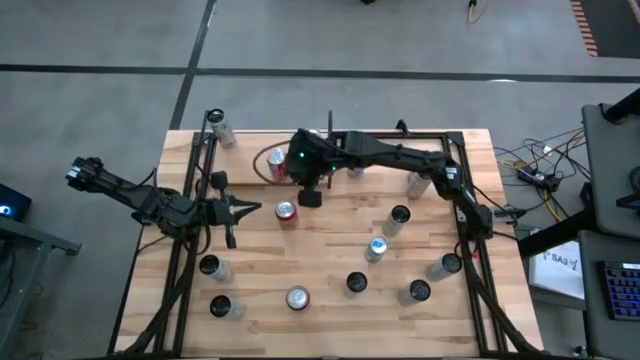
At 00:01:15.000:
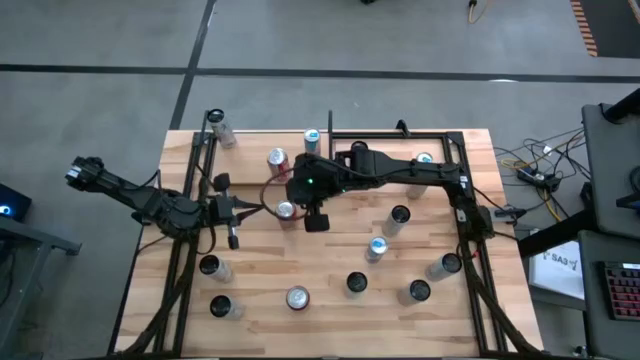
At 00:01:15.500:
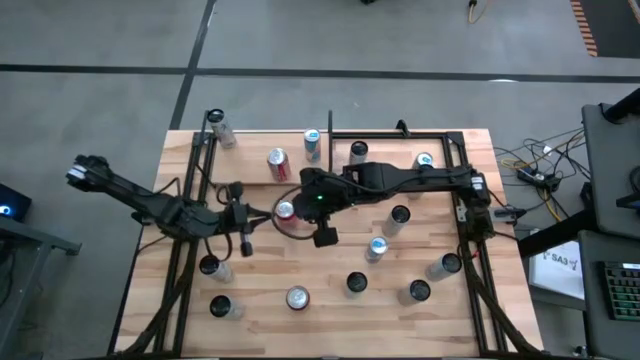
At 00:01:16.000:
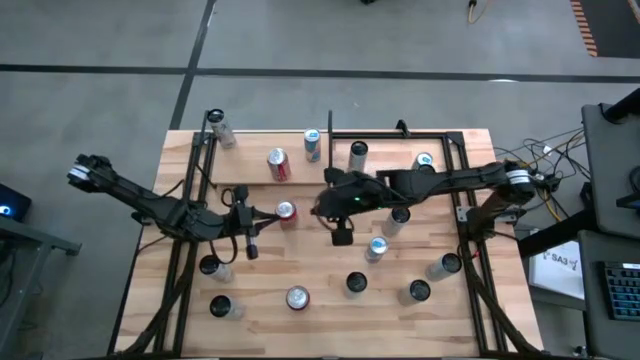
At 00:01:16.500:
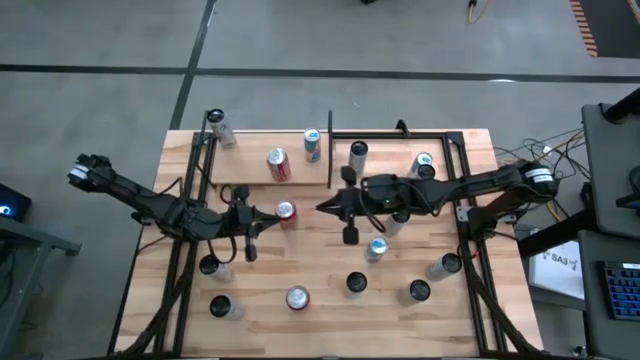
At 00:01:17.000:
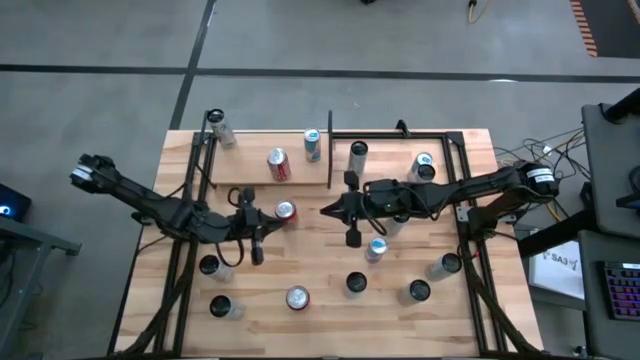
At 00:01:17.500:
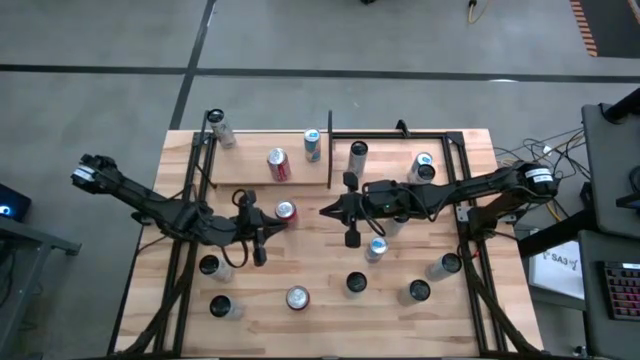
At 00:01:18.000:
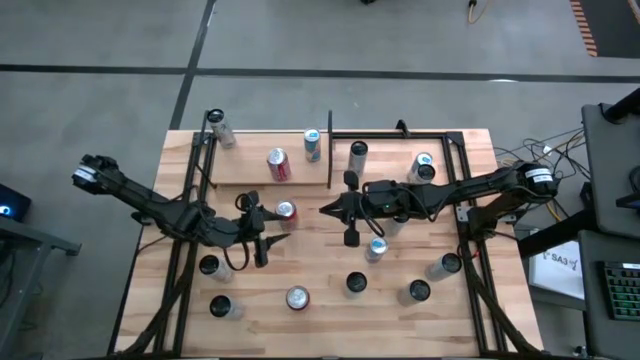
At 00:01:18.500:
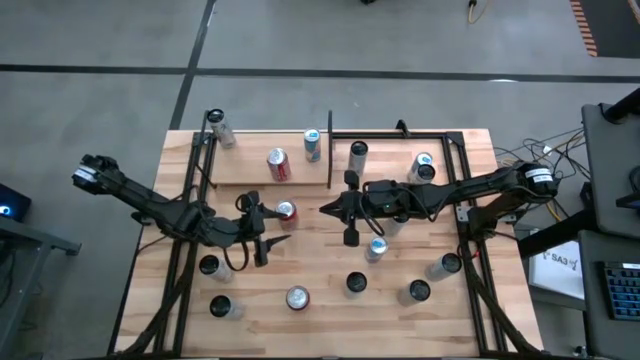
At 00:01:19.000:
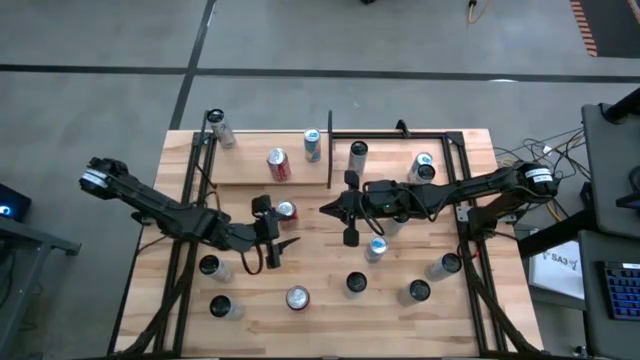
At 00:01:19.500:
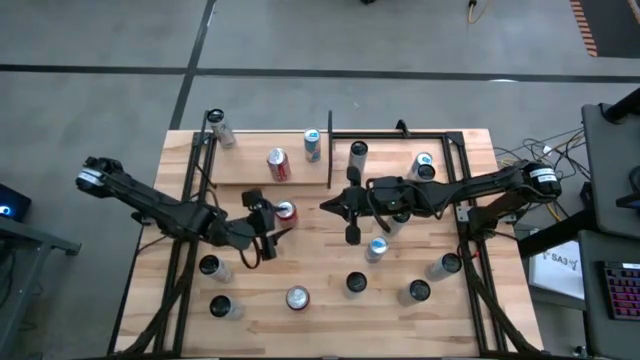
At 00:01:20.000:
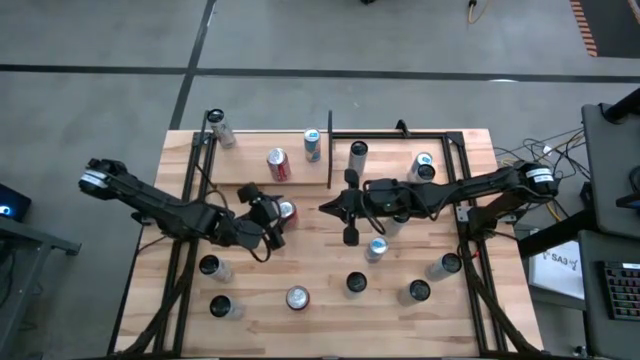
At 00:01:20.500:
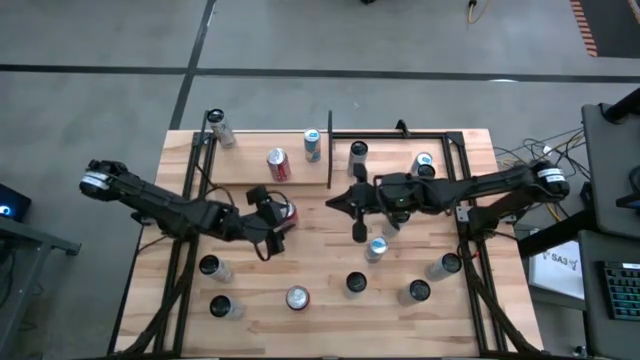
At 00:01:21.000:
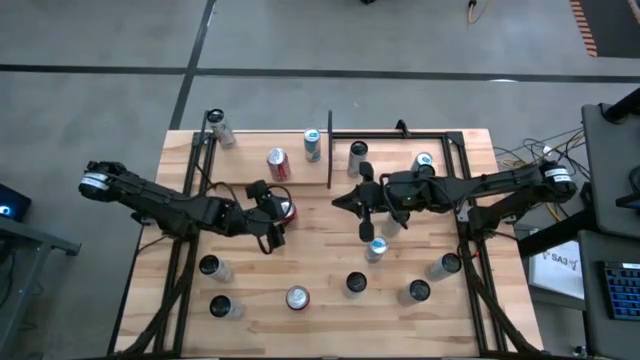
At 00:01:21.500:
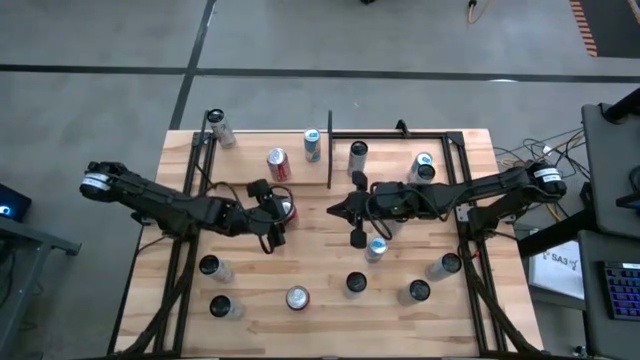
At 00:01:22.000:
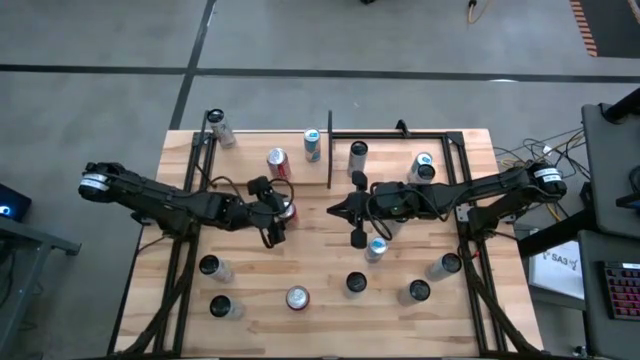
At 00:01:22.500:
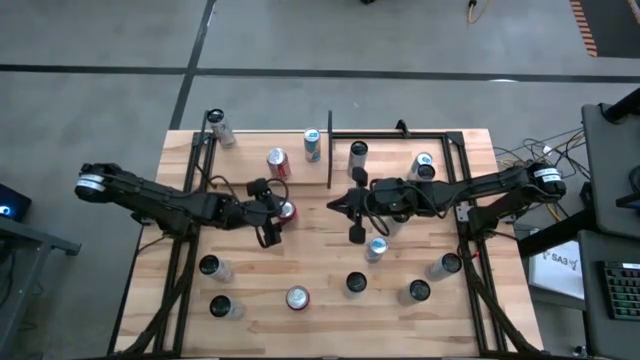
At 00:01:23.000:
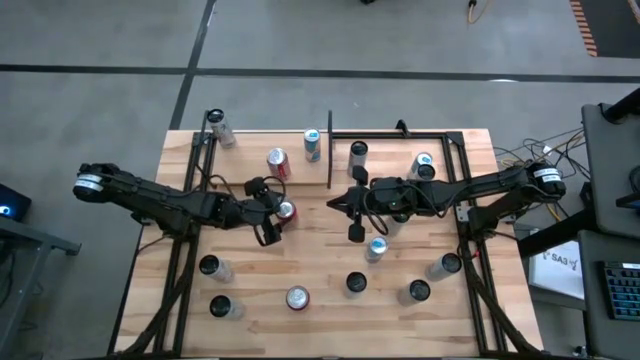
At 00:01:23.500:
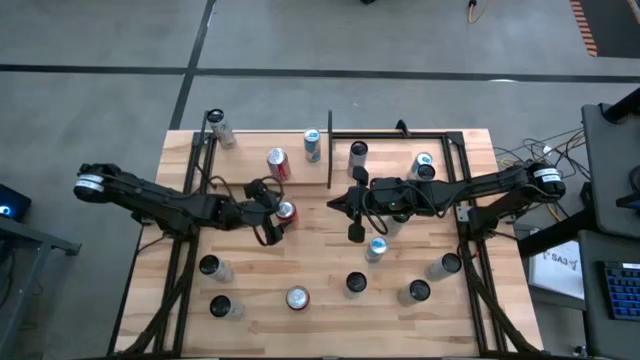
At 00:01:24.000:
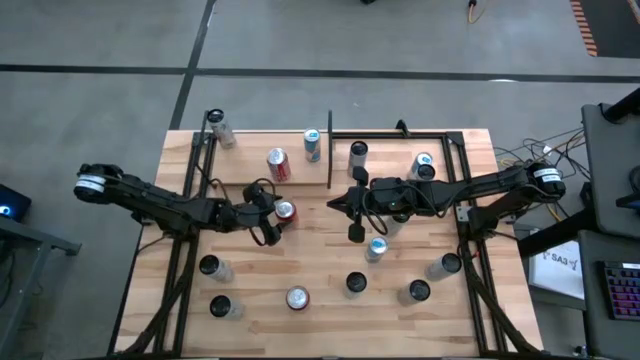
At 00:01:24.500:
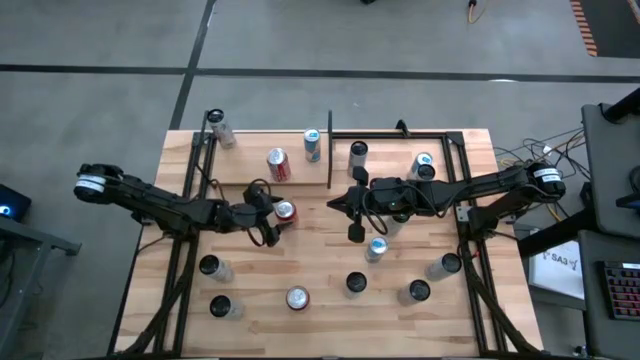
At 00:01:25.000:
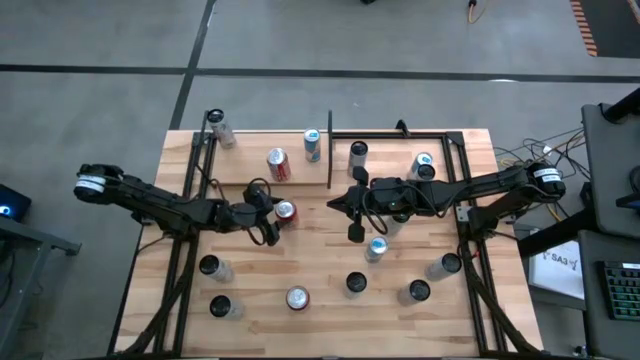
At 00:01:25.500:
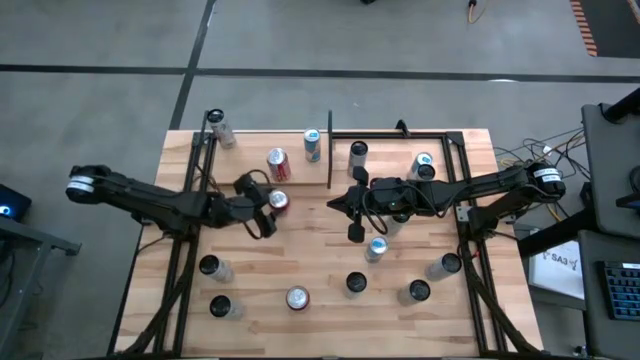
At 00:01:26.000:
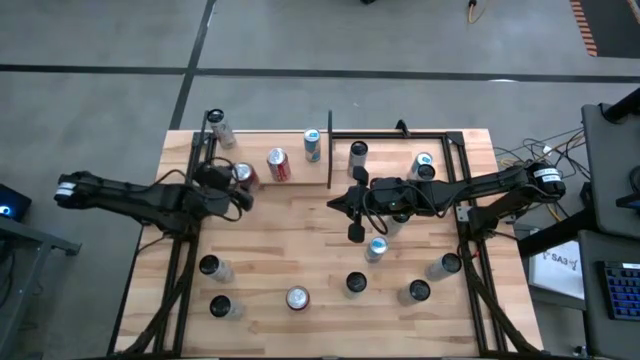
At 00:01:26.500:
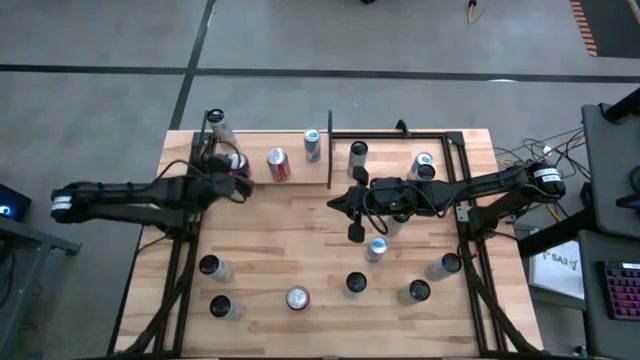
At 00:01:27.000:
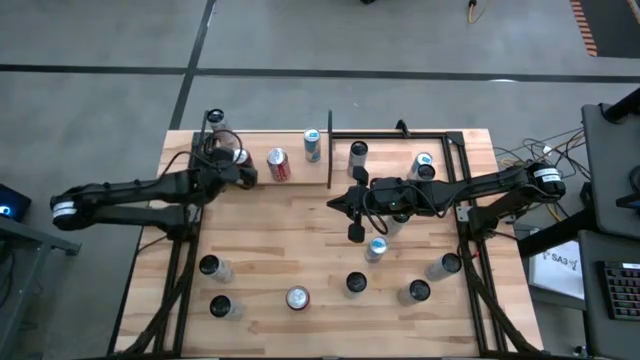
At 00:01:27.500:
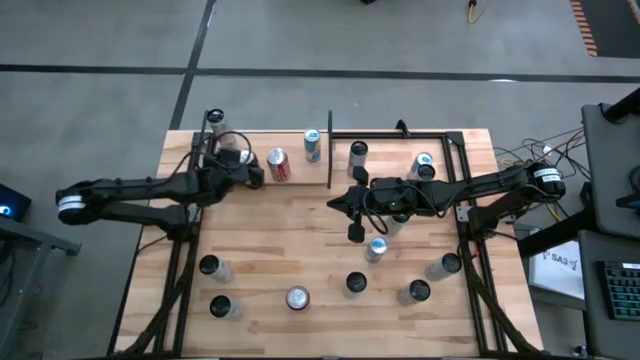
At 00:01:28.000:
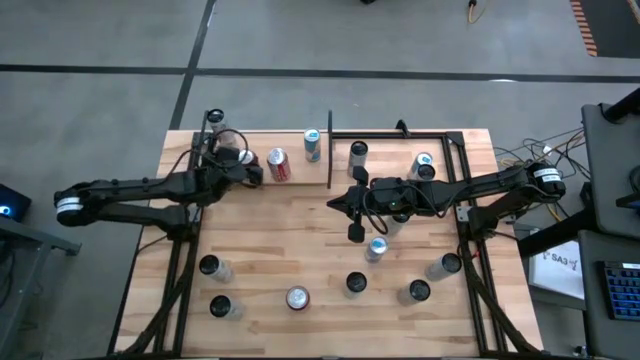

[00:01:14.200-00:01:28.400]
Task: Place canned beverage on shelf
Put the top red and black soda can on the shelf

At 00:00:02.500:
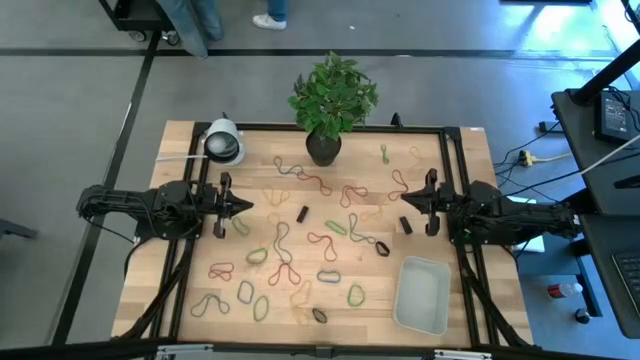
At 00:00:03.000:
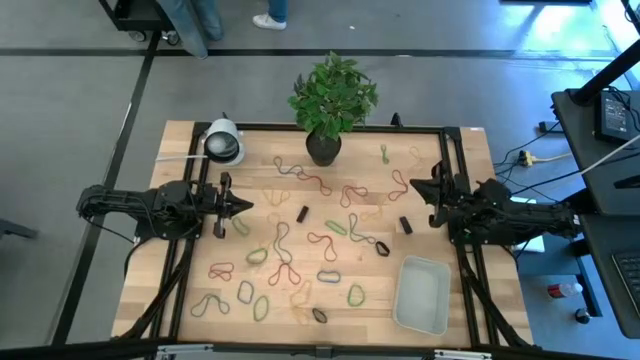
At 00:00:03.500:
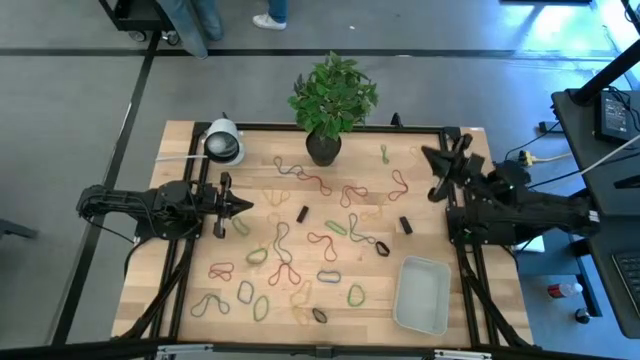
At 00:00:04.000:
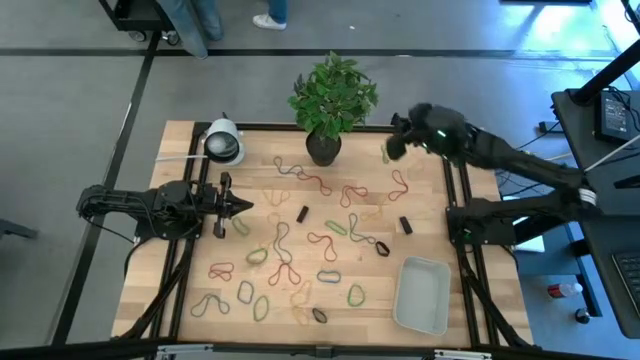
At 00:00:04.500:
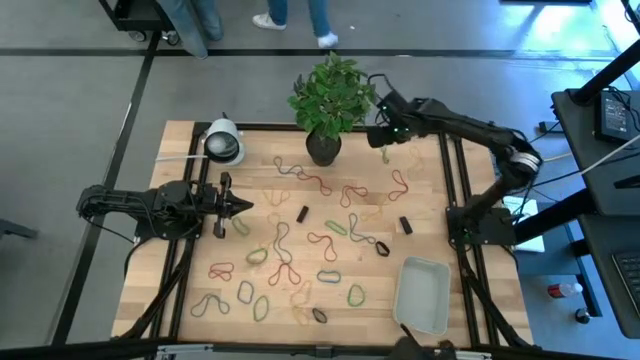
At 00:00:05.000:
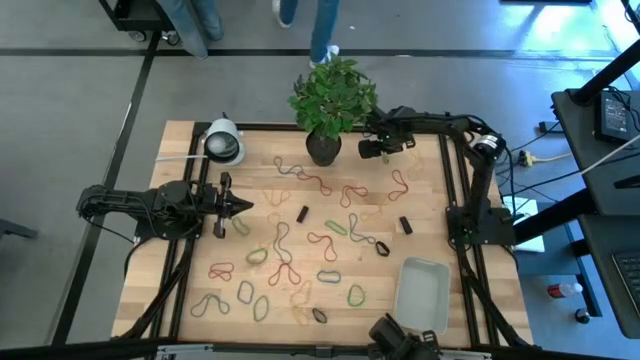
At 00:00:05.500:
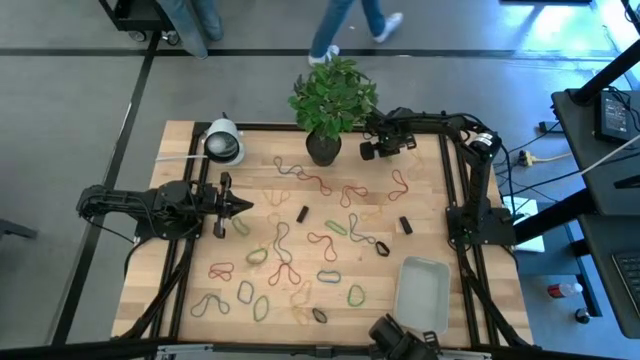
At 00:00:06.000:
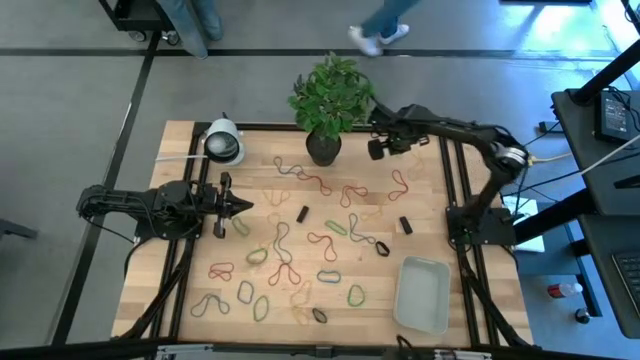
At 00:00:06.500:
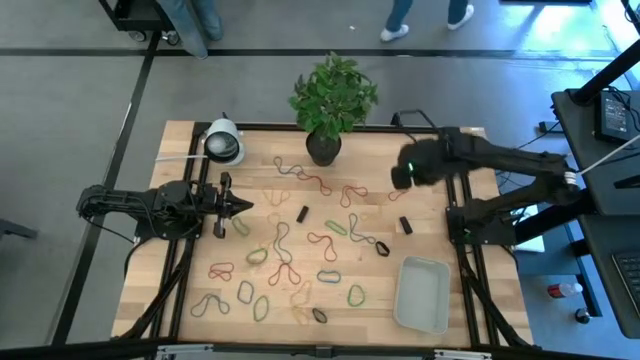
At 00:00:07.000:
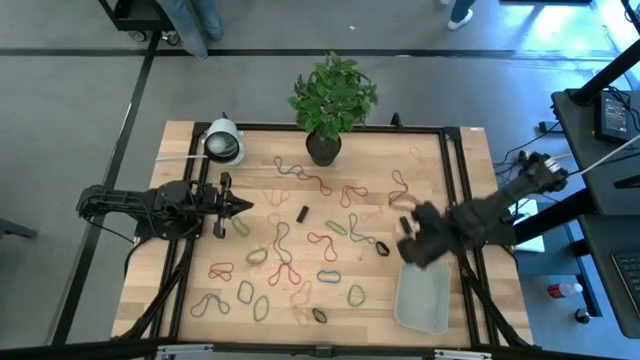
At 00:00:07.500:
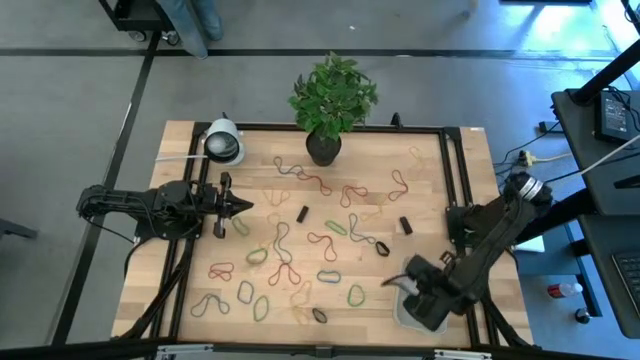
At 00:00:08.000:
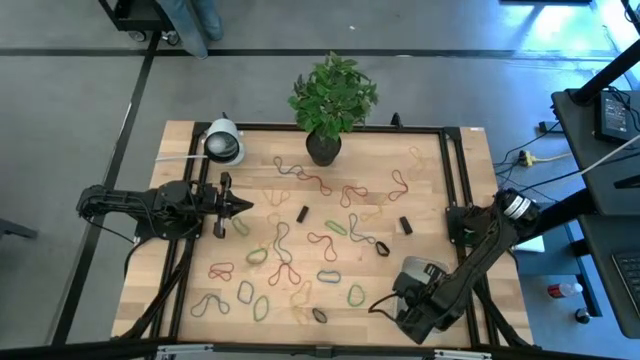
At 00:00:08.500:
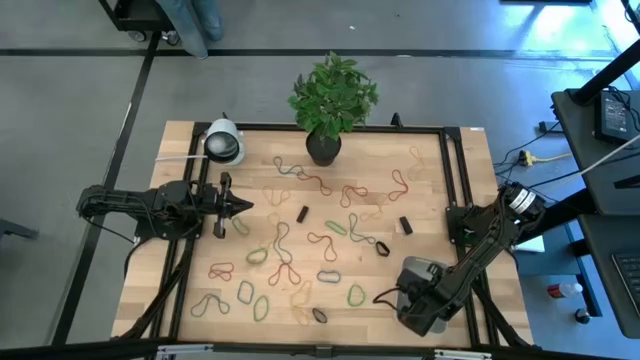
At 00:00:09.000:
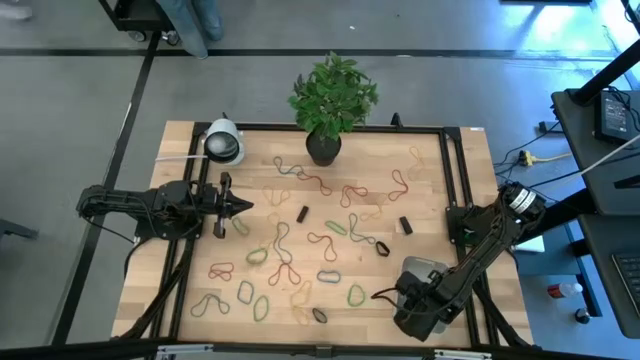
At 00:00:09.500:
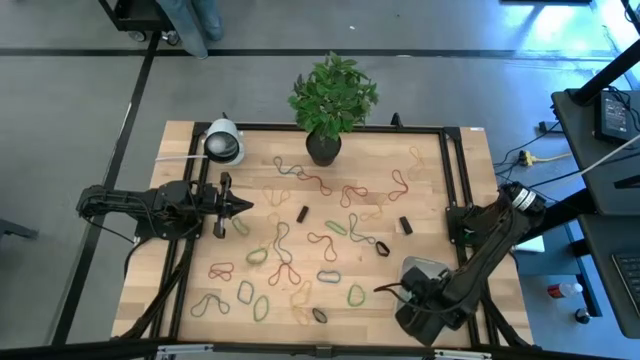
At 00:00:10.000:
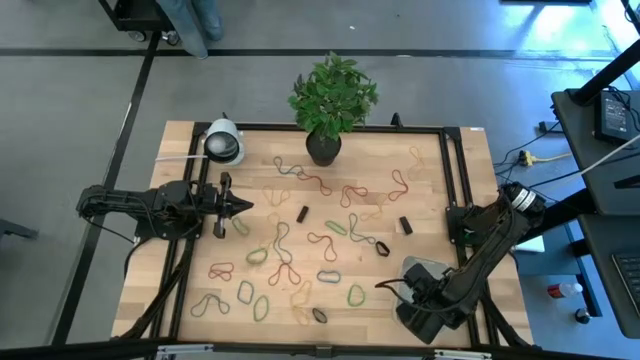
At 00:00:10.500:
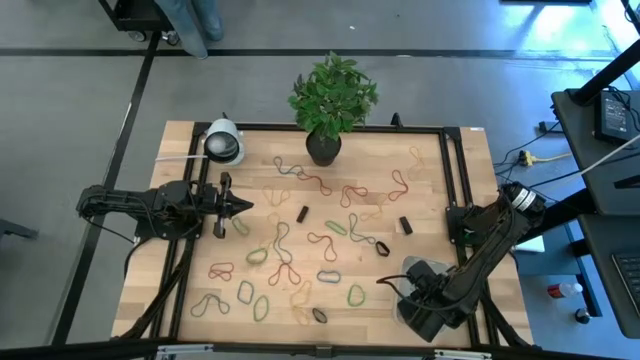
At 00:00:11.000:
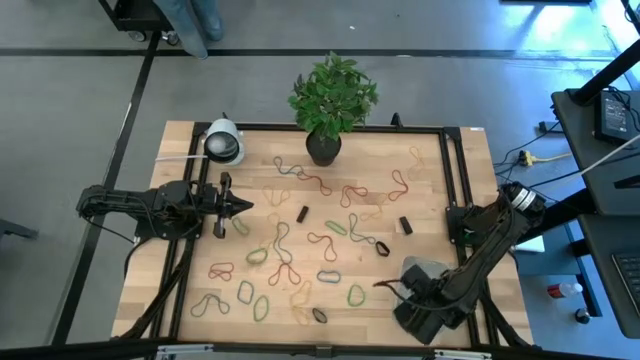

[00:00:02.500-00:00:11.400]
Task: Pick and place rubber bands into bin
Put the green rubber band into the gray bin
